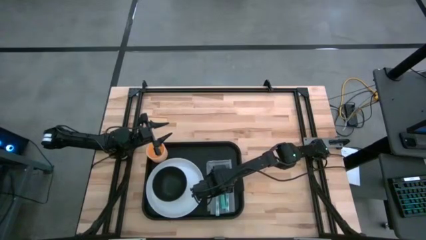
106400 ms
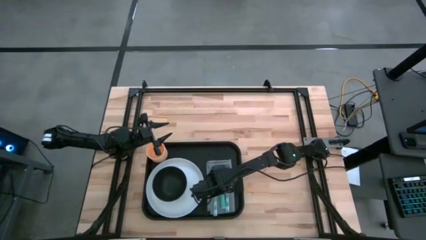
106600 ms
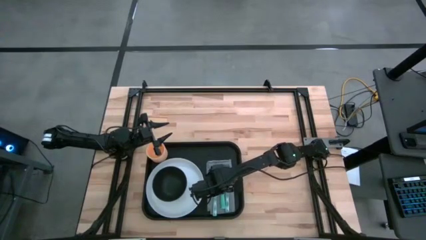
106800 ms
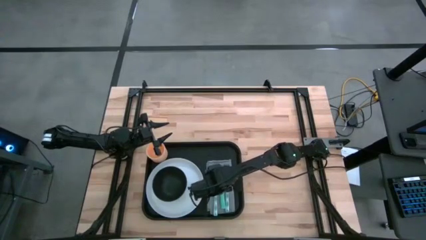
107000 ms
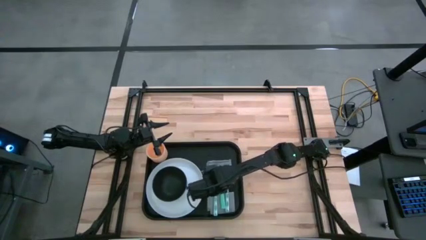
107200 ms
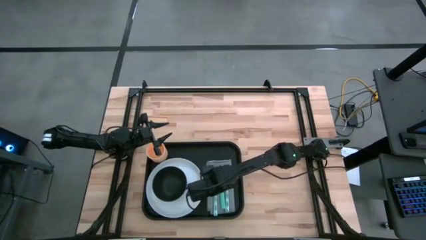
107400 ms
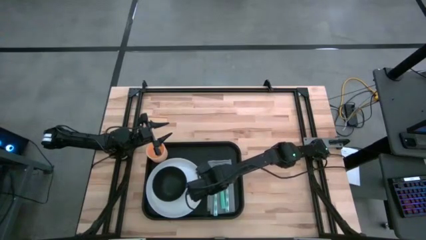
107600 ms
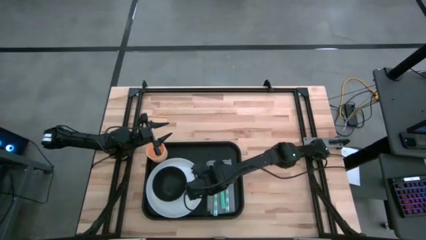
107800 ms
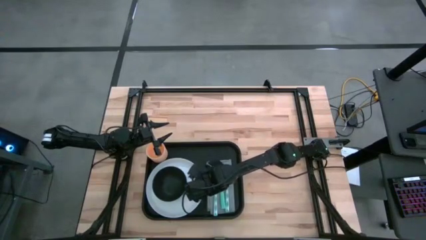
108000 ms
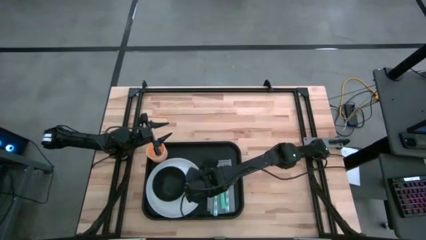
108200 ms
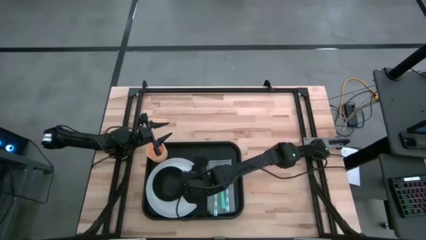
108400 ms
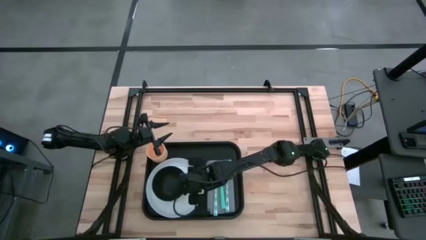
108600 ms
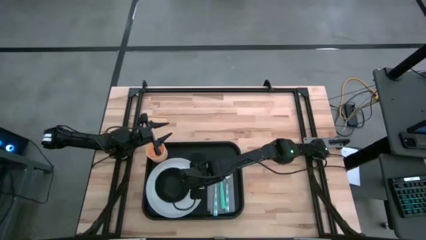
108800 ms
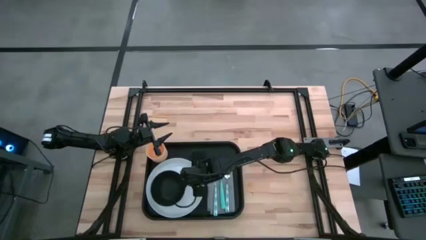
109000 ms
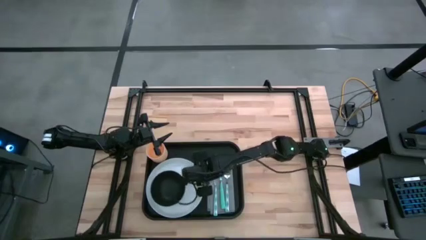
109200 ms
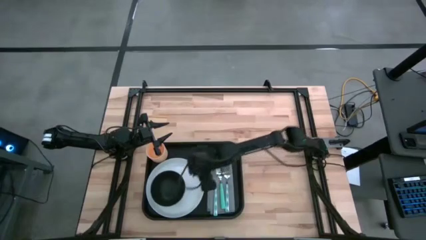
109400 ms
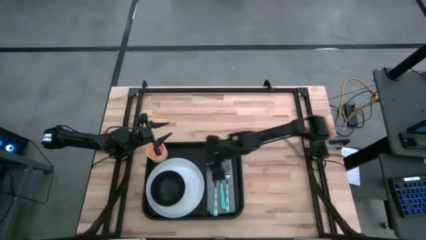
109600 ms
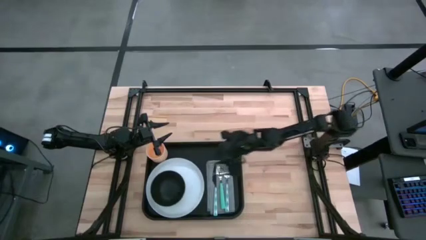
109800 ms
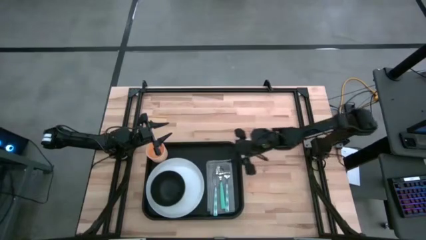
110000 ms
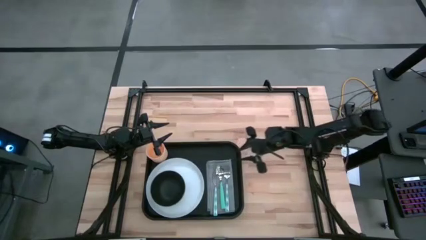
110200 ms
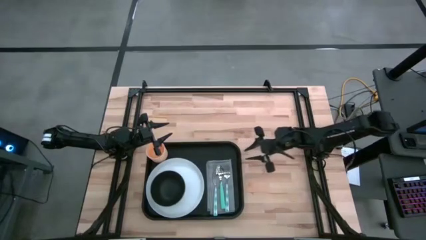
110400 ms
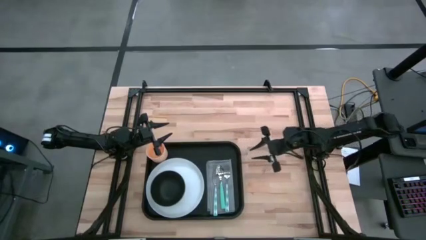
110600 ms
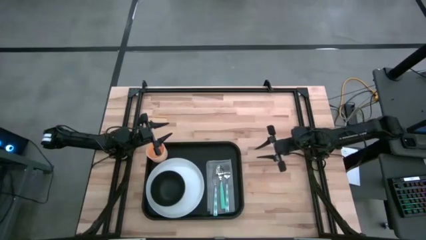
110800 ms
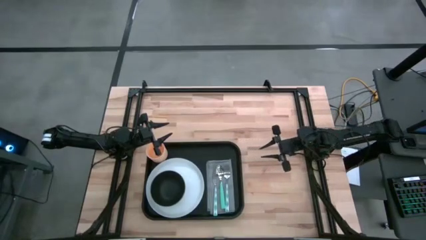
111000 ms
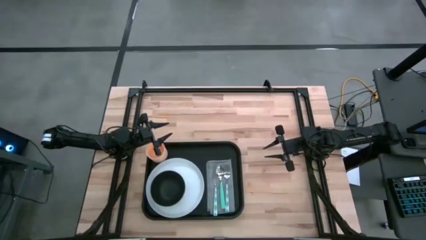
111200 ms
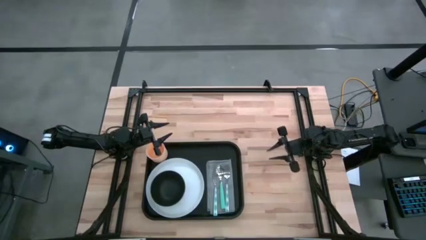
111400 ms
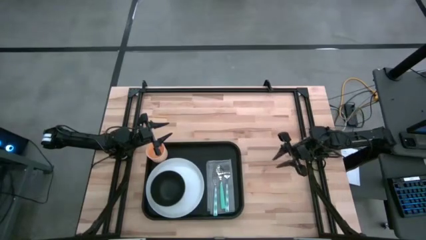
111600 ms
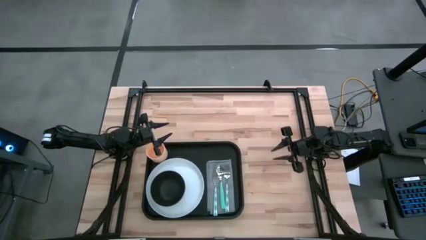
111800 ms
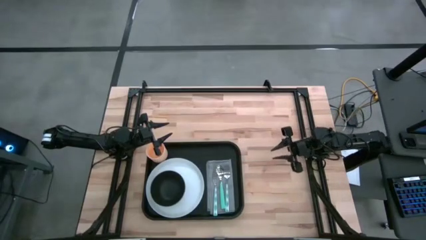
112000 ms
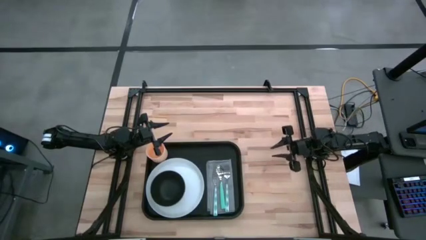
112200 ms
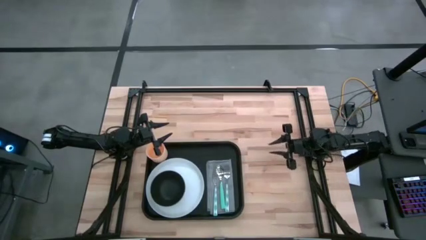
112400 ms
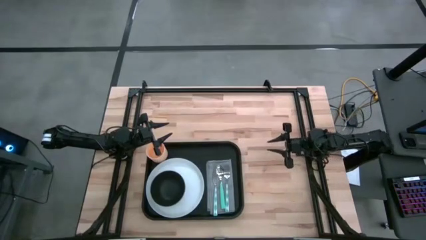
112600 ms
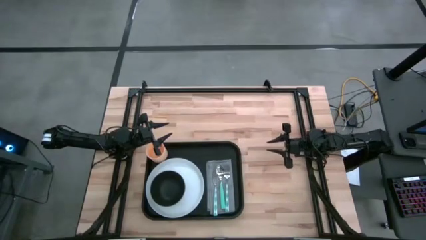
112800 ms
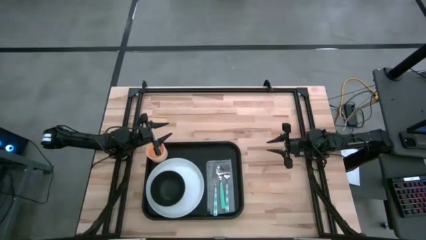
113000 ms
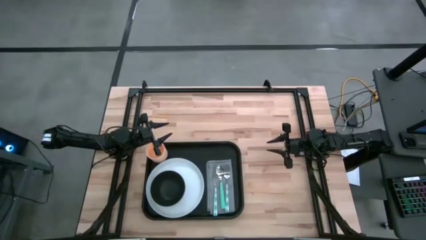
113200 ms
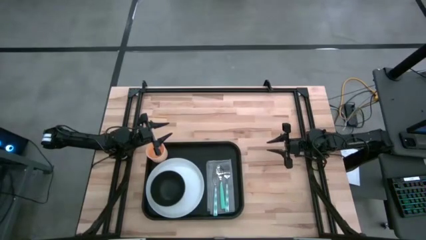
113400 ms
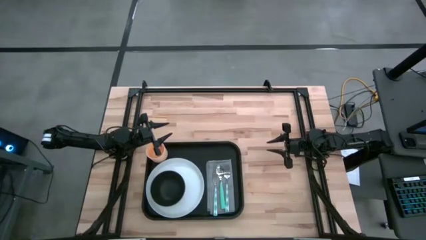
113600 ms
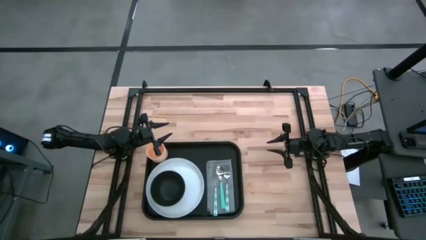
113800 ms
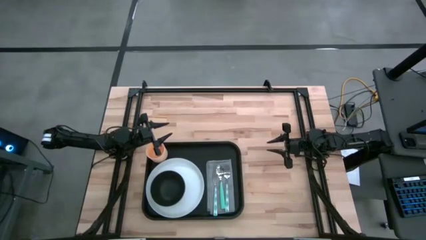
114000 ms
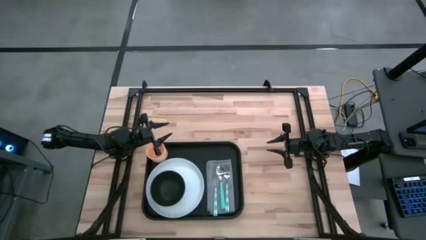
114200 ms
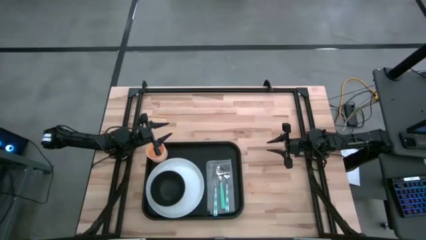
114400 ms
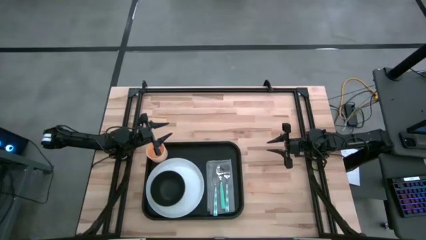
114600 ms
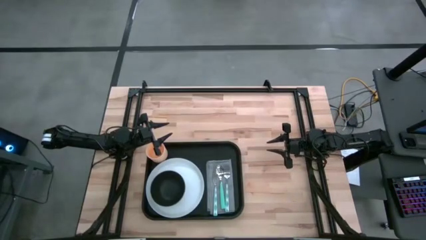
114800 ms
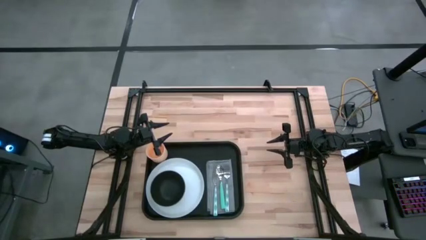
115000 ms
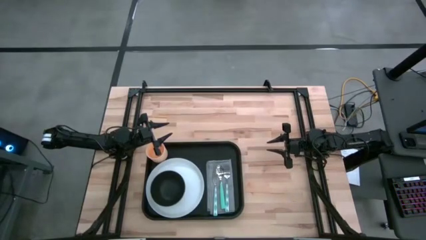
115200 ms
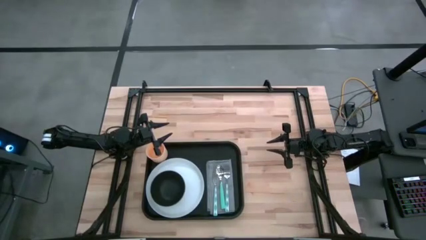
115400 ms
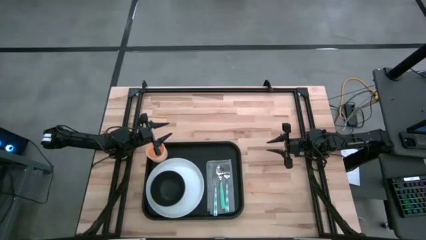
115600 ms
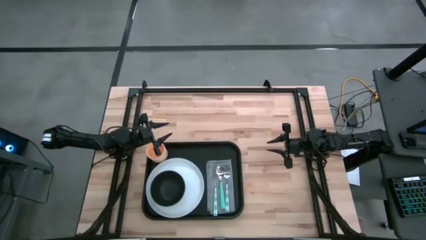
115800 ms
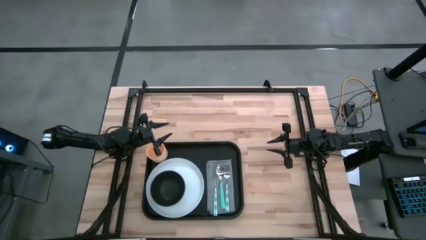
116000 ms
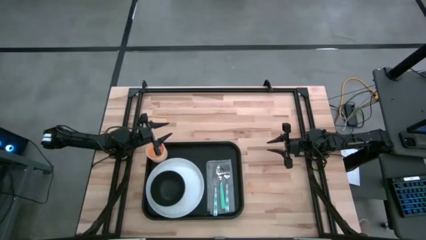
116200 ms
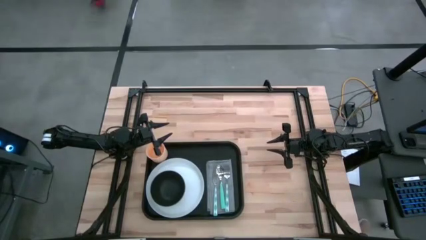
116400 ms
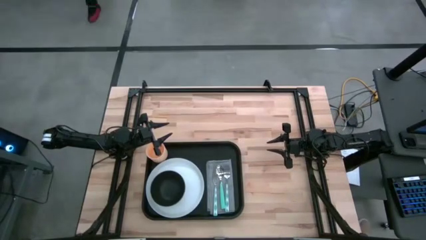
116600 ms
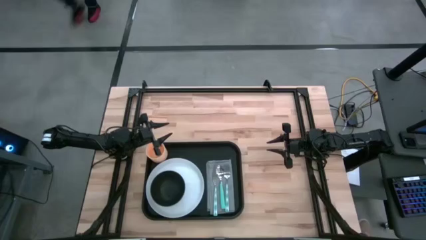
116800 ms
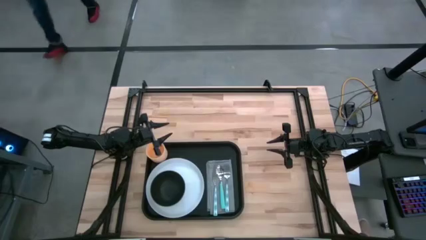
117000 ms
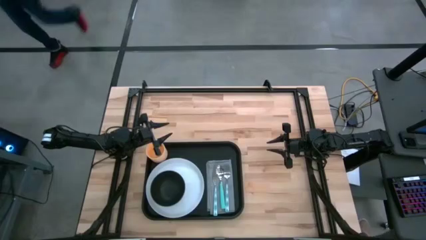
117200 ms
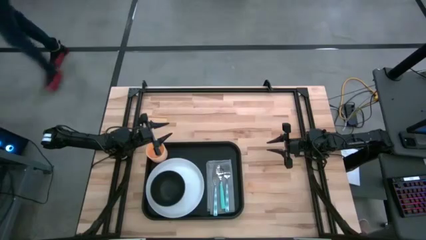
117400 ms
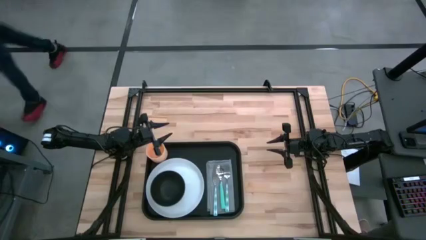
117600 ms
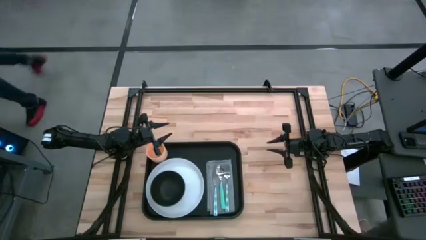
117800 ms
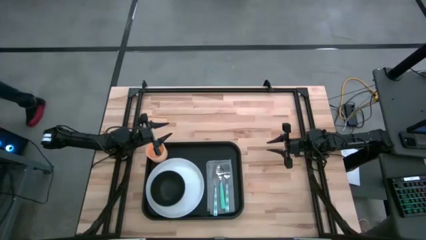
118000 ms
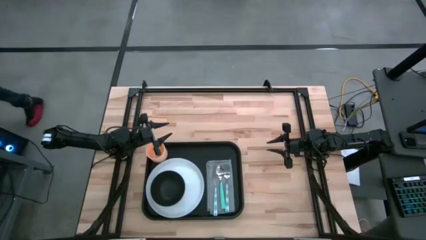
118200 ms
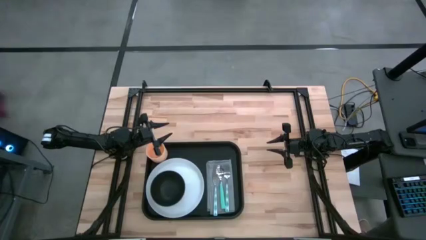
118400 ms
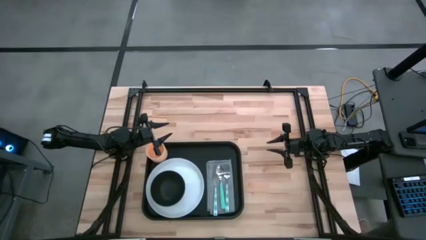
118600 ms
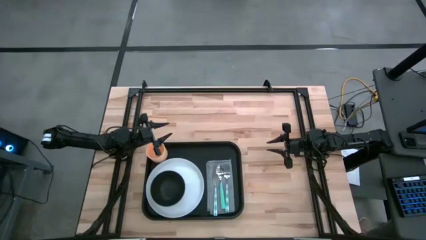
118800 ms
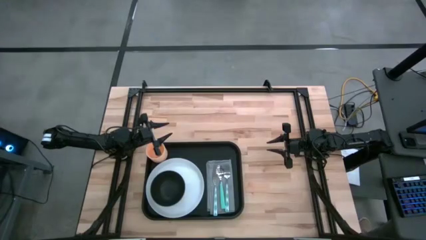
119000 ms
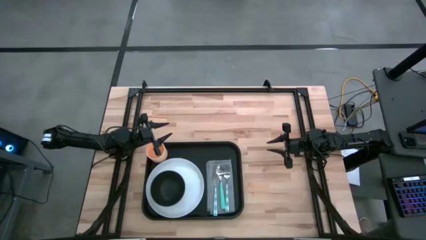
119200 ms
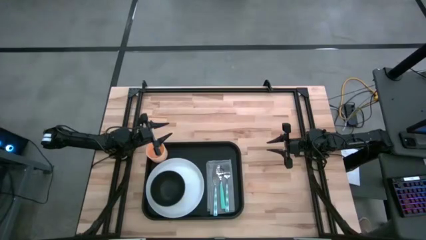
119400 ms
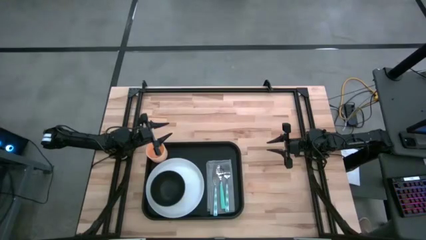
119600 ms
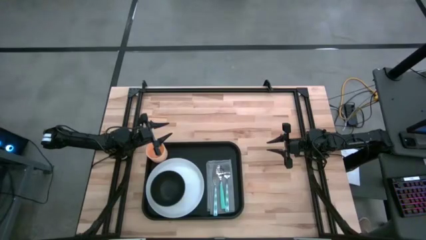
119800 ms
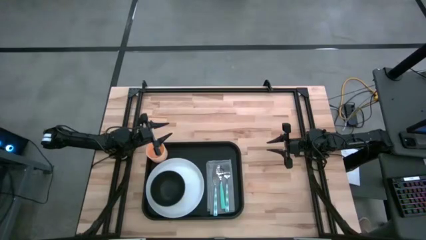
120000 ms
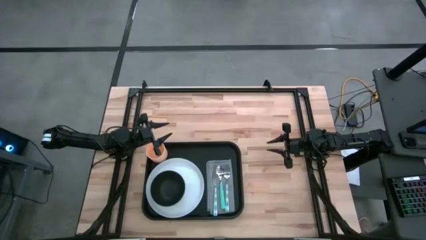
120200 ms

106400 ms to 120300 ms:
Task: Set up tray
Return to Home Position
